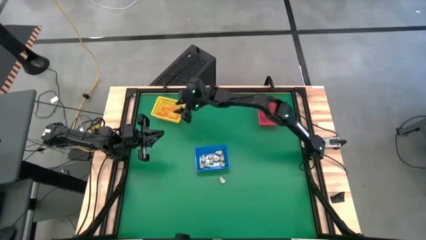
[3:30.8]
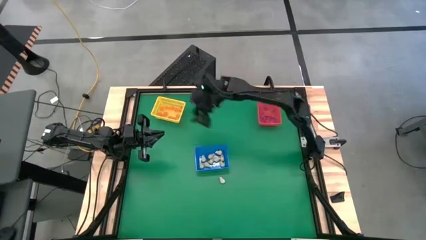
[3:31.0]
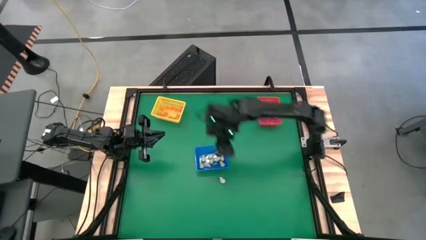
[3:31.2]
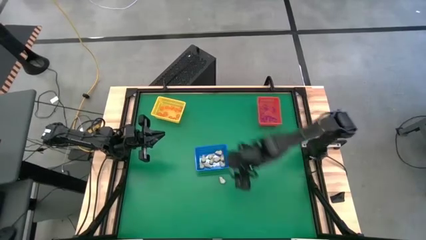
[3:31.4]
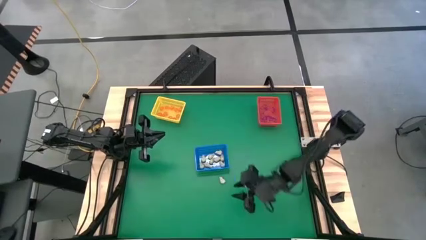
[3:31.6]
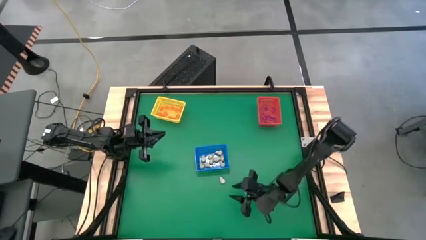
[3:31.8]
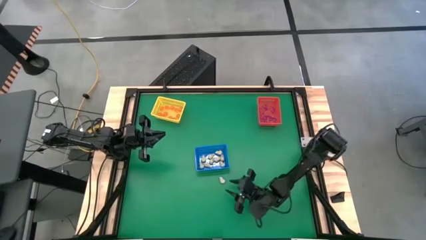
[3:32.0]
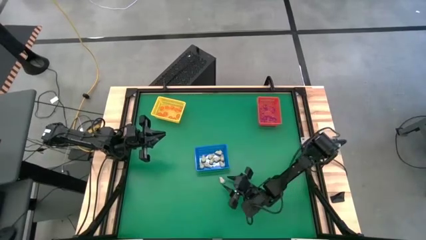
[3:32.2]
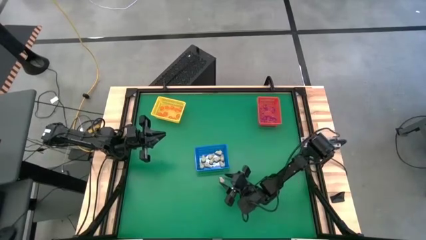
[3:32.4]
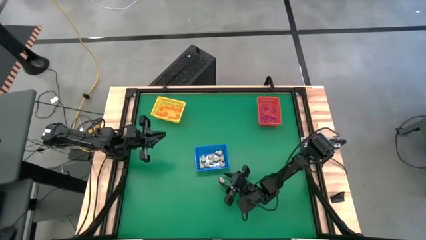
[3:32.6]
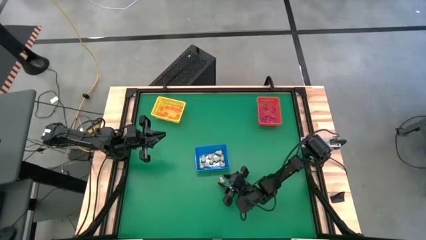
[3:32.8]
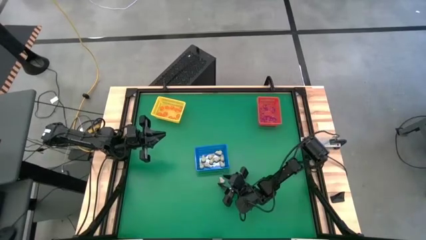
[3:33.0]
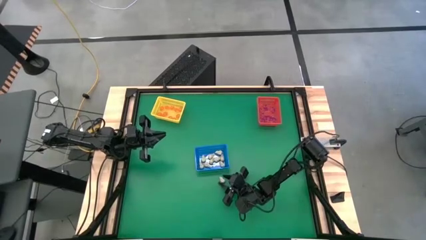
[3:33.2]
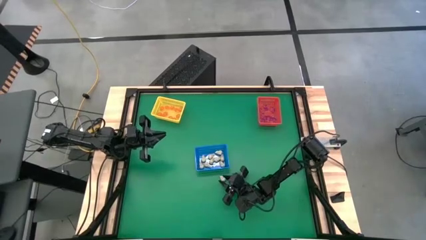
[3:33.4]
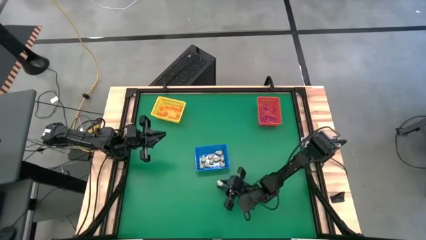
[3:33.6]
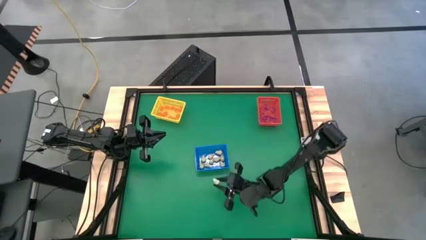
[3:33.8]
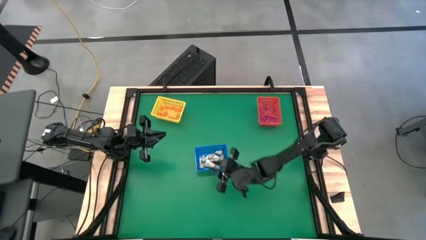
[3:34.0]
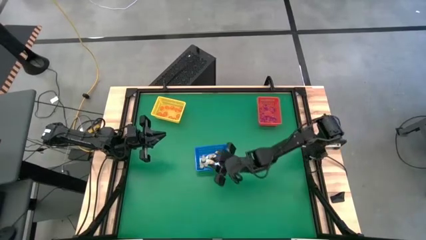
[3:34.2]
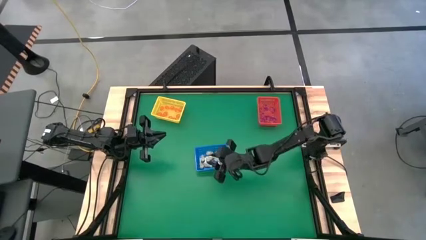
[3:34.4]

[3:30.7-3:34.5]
Task: Sort Halloween decoration
Put the white skull toy into the blue bin

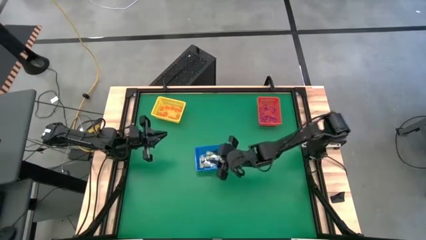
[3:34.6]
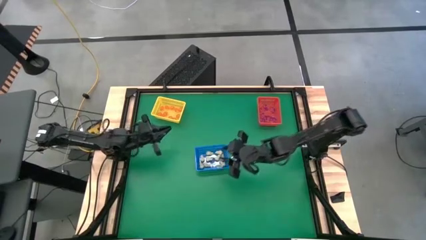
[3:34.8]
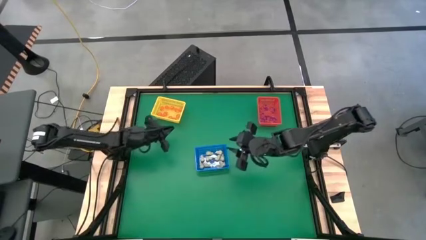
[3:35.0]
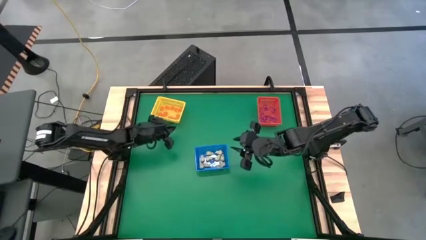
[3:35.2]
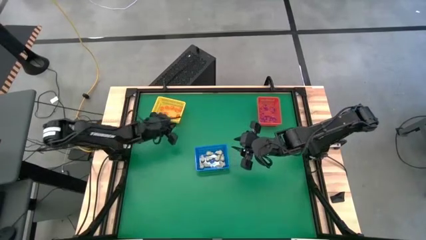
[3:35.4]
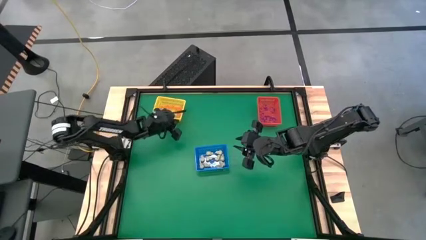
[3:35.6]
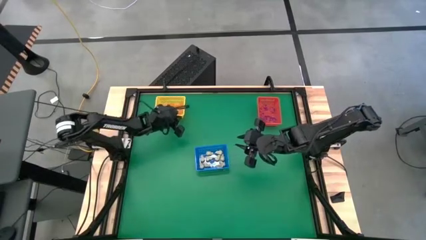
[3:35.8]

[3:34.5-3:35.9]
Adjust the yellow bin

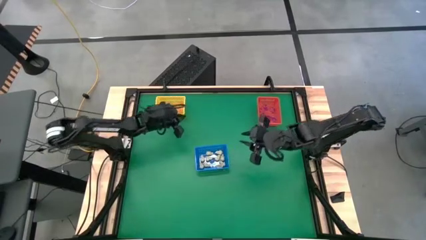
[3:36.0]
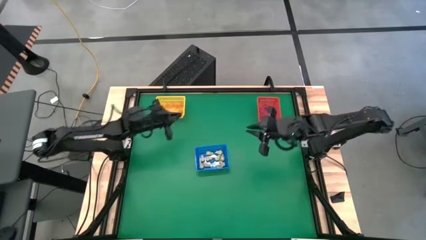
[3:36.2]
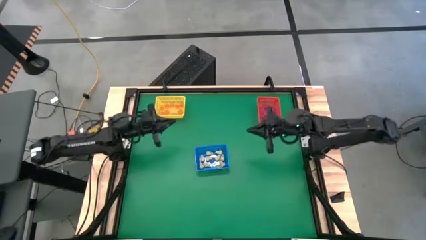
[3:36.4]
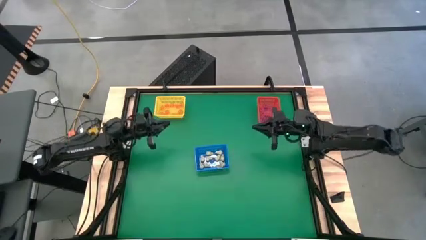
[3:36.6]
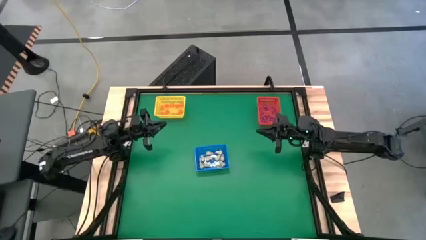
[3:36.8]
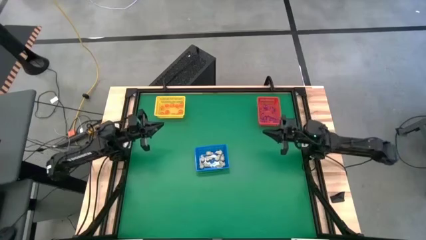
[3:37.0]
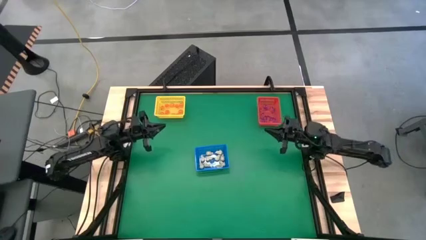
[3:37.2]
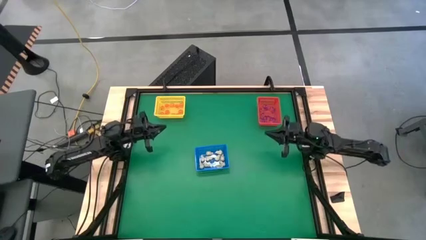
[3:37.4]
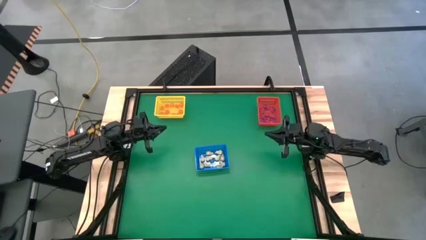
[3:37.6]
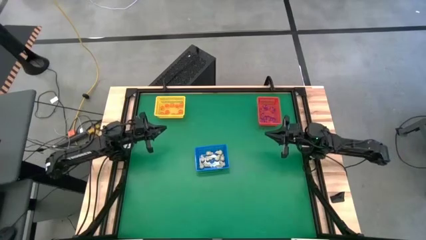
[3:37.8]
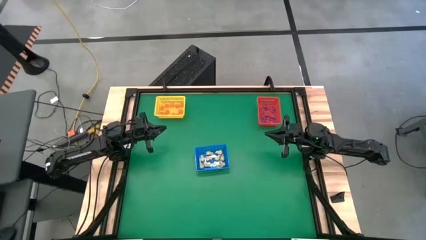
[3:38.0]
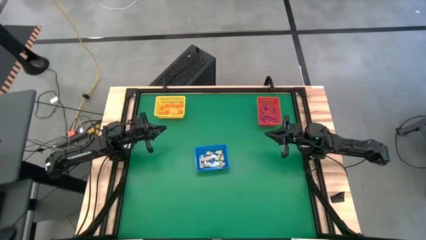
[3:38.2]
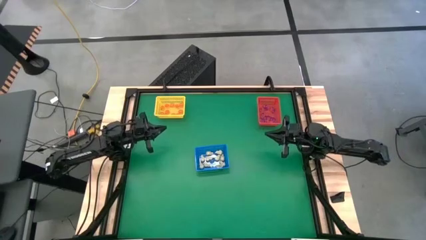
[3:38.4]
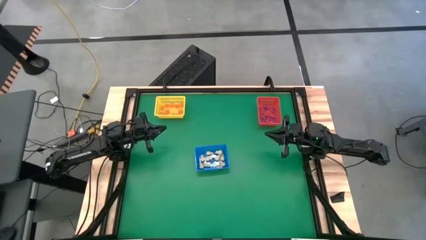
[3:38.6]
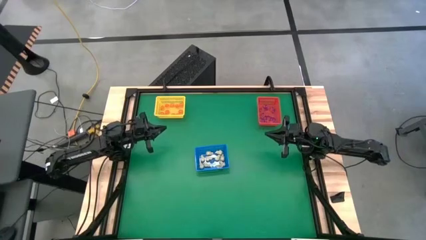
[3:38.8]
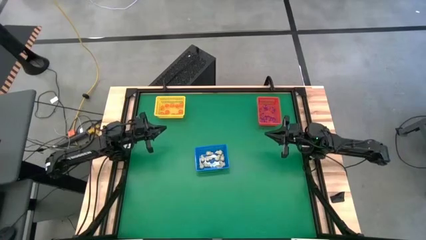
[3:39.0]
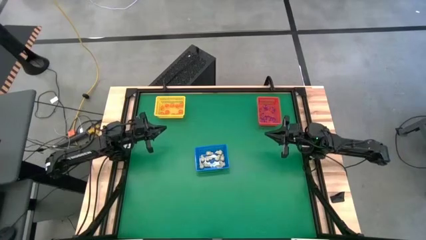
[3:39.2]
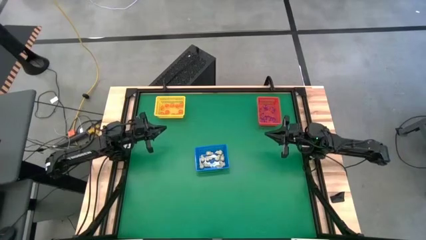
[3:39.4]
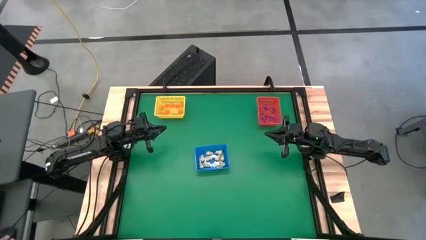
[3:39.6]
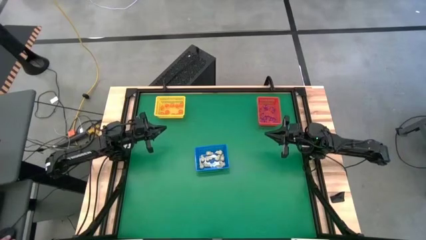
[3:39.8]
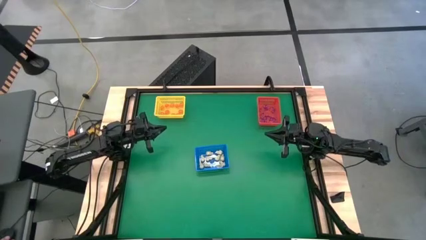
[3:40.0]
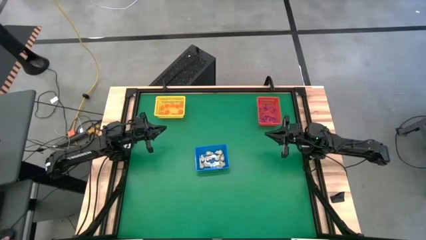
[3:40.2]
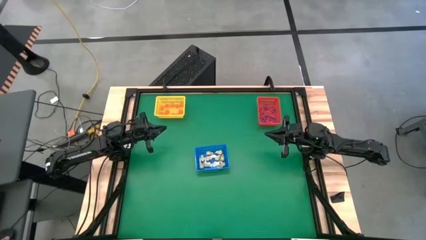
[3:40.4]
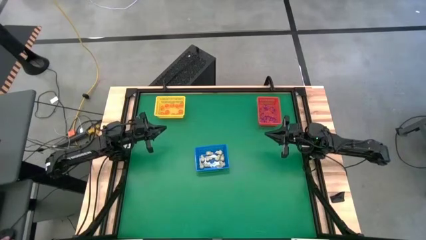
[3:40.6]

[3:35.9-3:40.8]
Return to Home Position

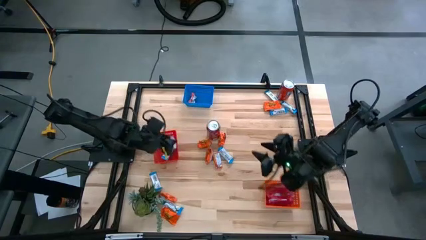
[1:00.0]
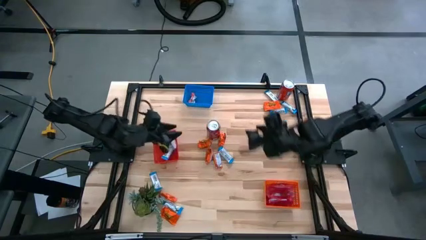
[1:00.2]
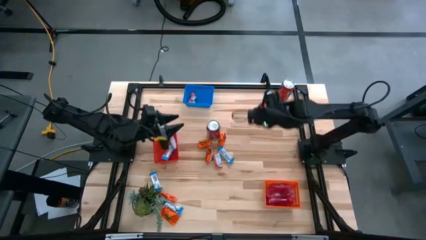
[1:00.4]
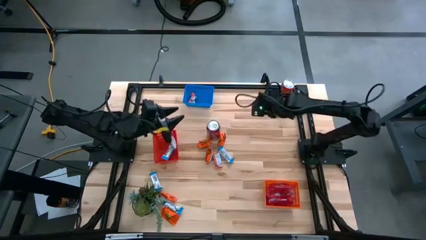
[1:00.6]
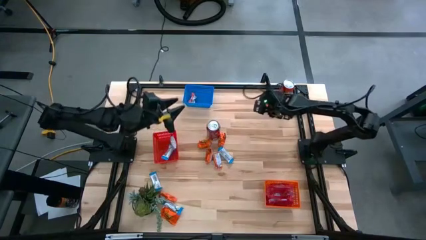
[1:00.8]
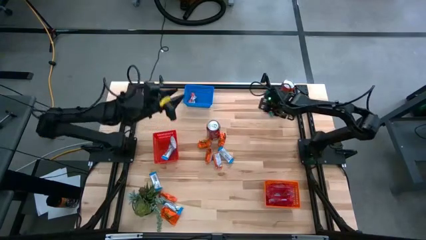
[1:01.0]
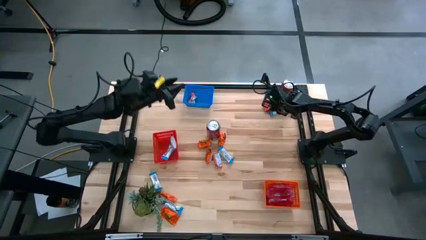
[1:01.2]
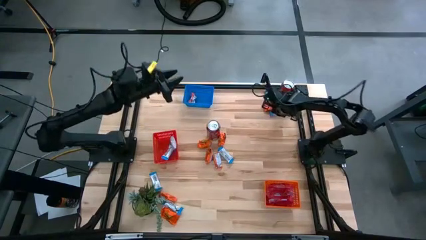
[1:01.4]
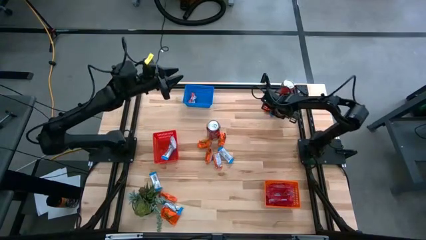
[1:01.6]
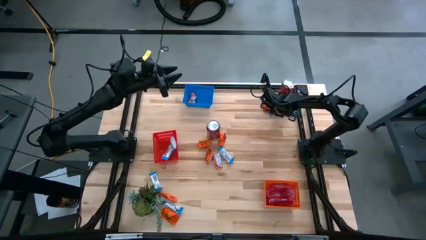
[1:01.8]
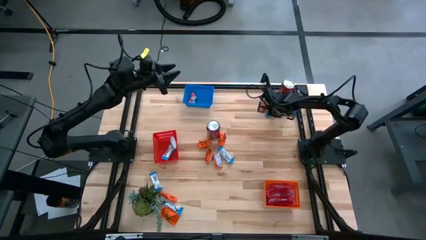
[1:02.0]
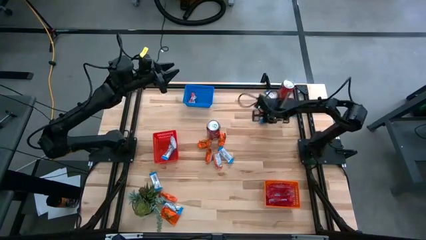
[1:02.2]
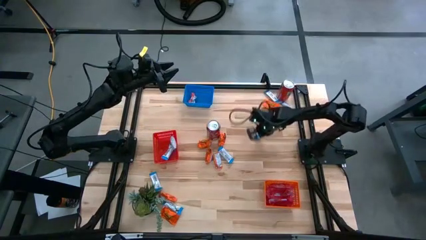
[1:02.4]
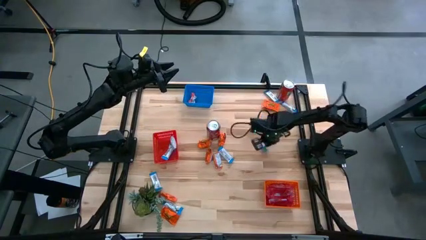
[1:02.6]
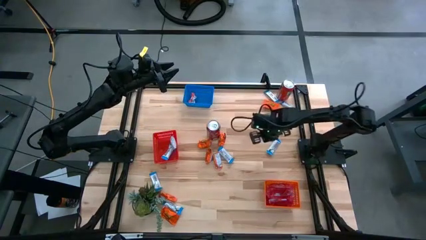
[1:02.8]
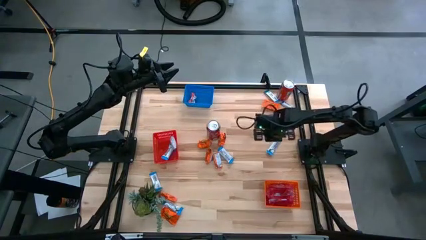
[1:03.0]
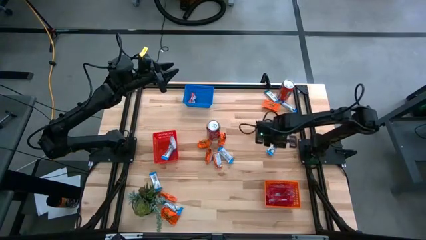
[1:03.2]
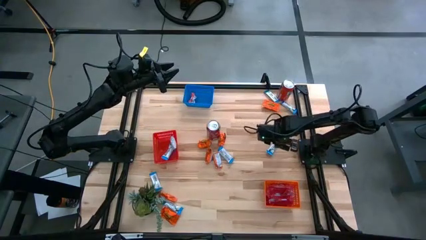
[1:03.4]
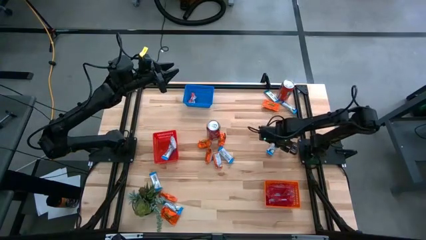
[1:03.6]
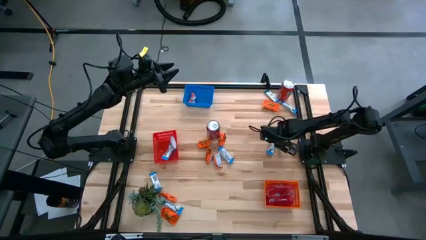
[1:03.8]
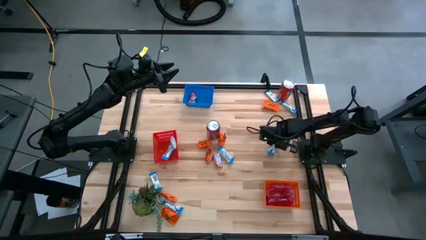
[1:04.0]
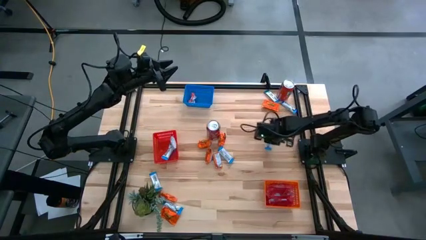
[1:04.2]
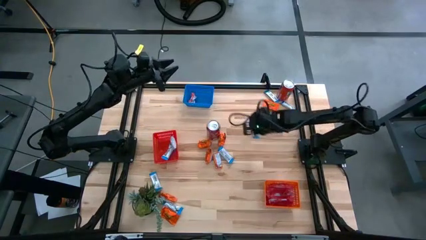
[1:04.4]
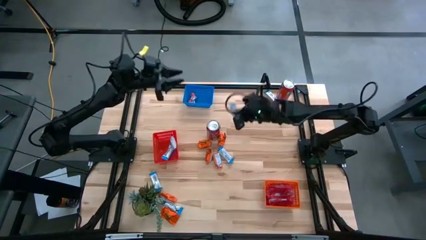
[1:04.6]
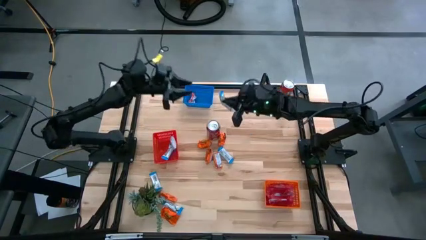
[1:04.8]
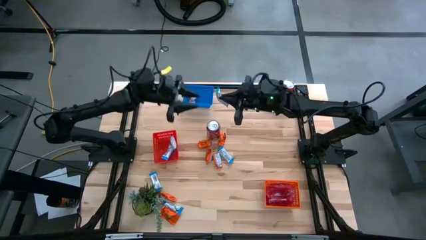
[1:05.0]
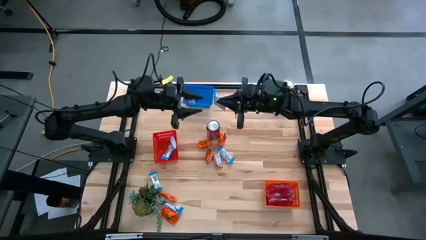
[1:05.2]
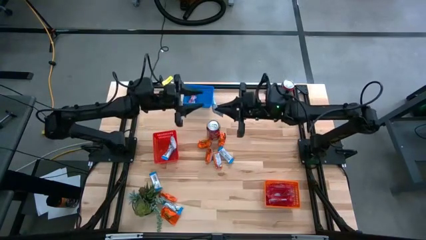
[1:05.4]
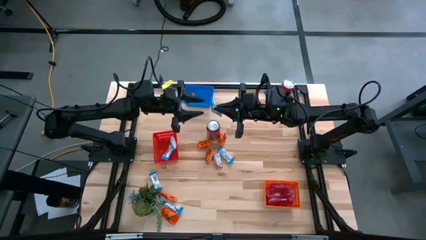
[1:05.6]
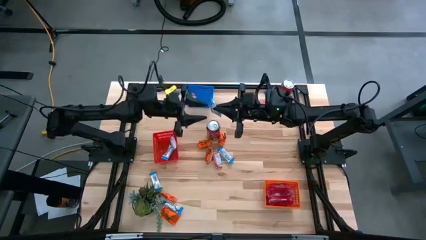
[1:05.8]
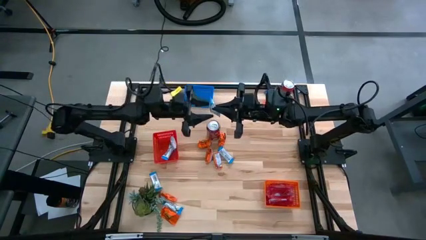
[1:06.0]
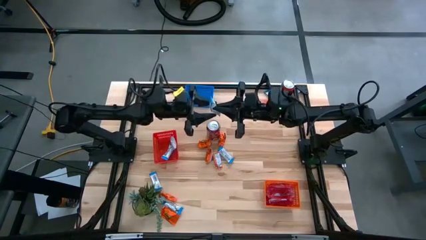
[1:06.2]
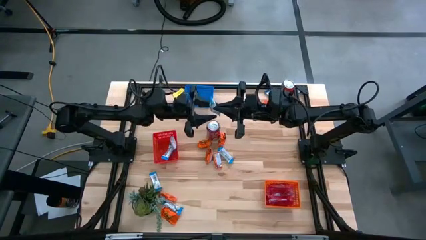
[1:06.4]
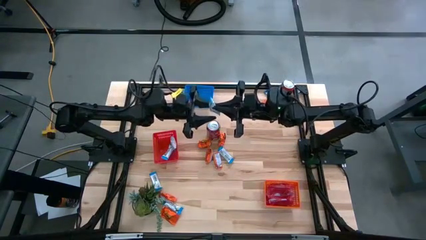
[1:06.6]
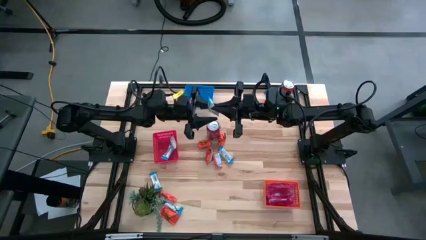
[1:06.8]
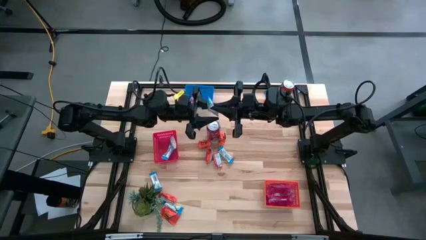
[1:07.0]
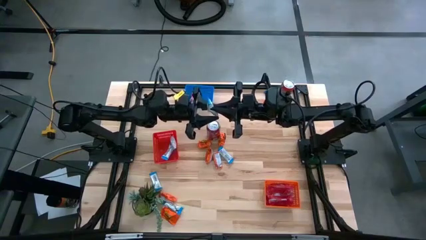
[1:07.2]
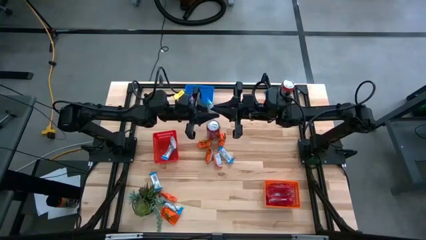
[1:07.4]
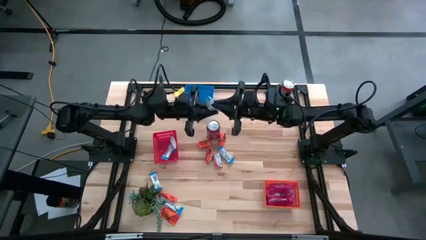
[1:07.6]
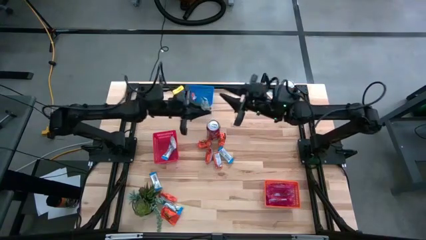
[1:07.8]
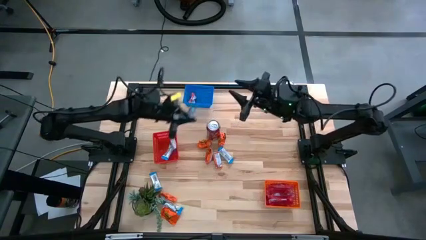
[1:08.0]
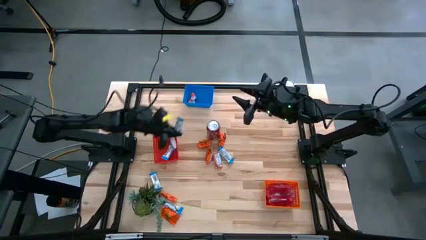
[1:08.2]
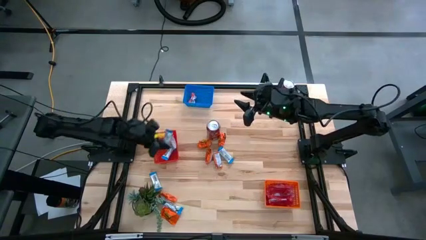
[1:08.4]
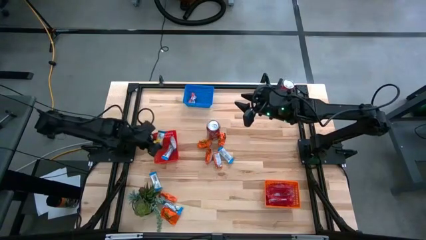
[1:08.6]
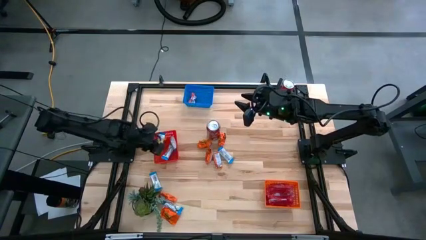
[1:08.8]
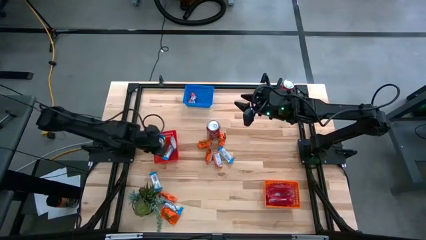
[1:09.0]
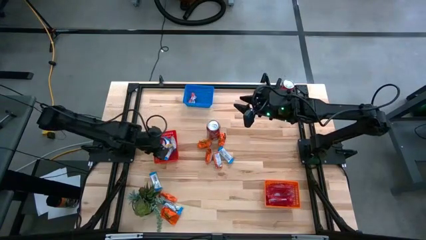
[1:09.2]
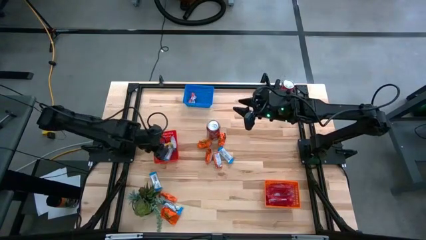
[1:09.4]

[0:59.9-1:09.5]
Task: Sort candy
Put the white chocolate into the red bin
